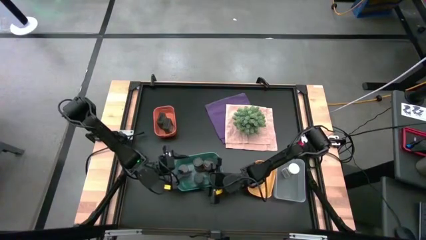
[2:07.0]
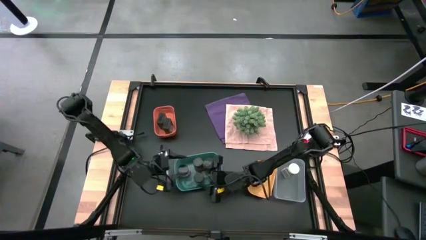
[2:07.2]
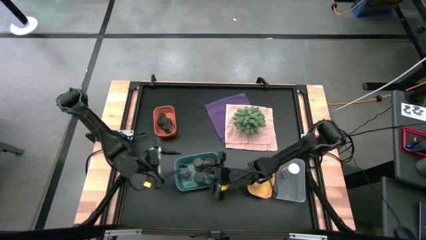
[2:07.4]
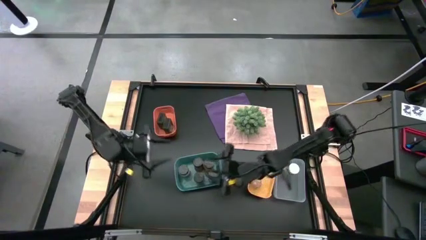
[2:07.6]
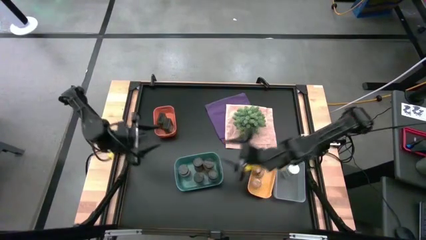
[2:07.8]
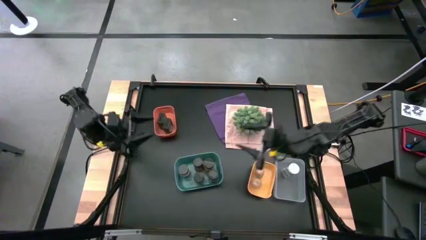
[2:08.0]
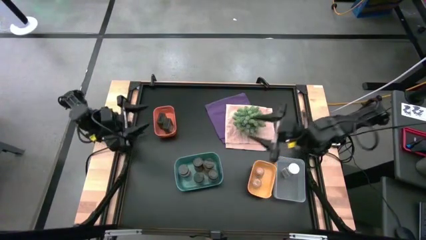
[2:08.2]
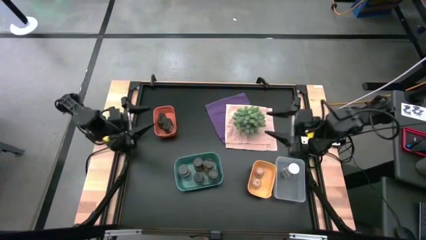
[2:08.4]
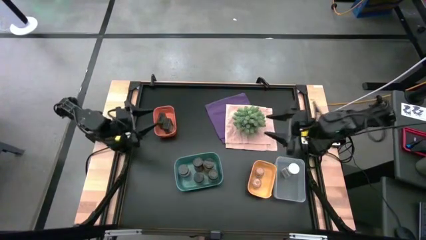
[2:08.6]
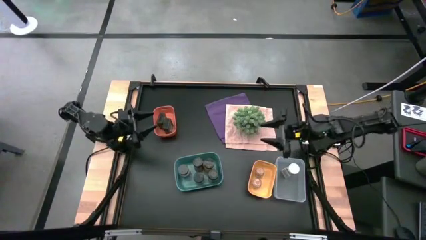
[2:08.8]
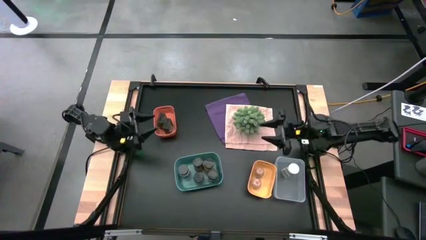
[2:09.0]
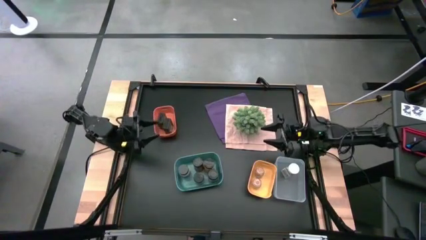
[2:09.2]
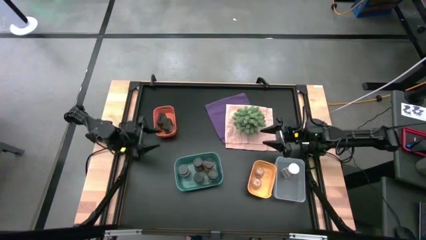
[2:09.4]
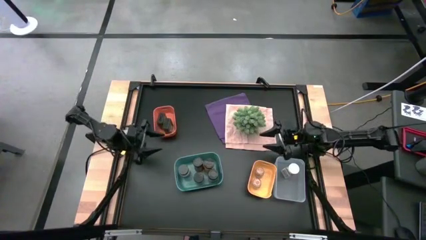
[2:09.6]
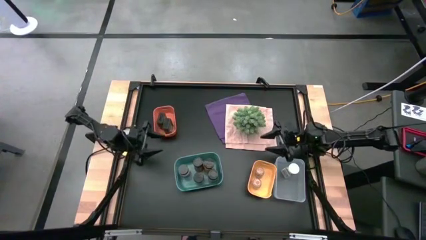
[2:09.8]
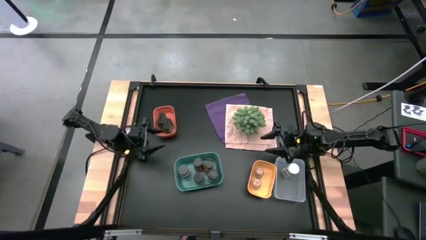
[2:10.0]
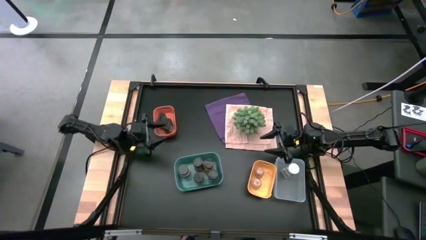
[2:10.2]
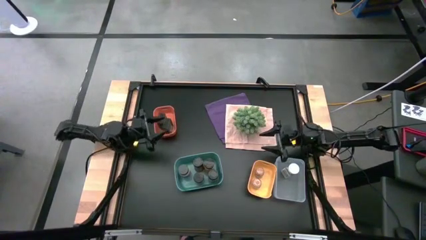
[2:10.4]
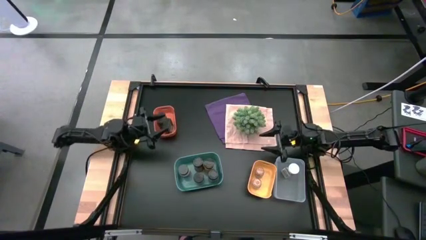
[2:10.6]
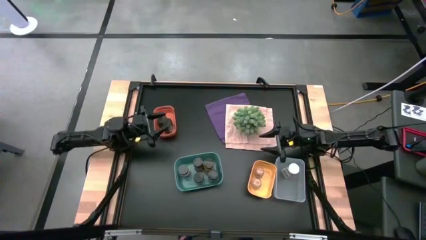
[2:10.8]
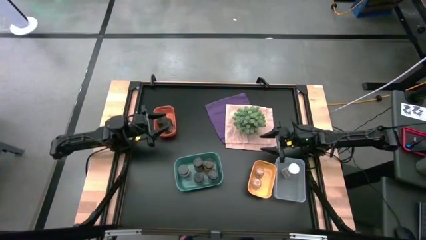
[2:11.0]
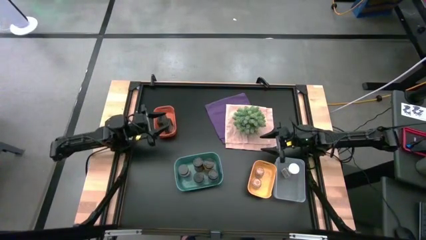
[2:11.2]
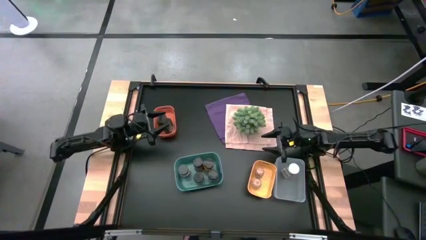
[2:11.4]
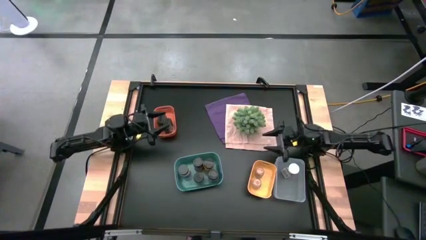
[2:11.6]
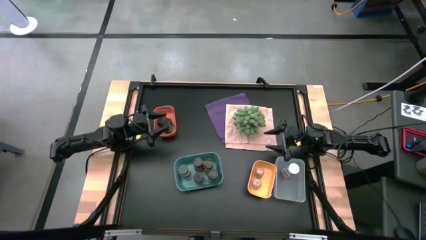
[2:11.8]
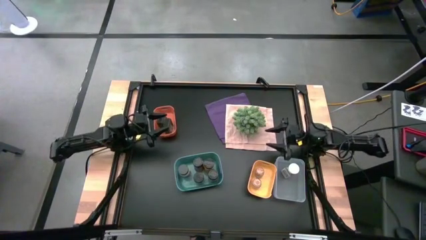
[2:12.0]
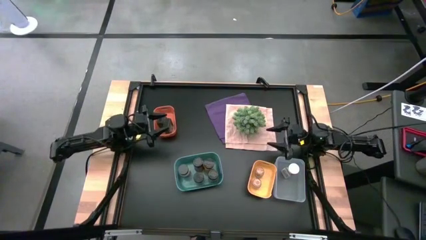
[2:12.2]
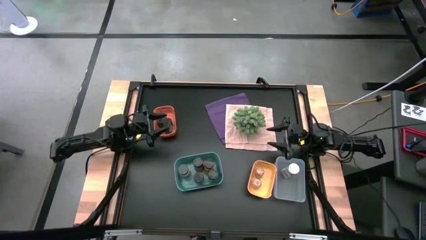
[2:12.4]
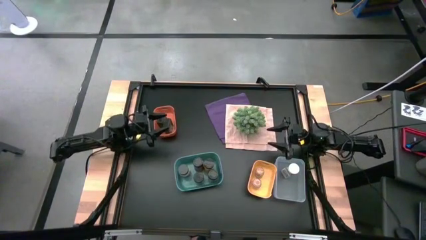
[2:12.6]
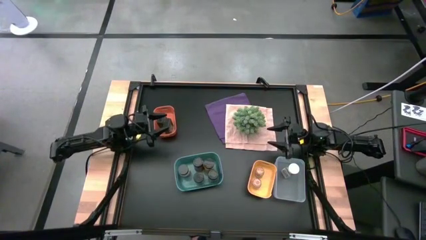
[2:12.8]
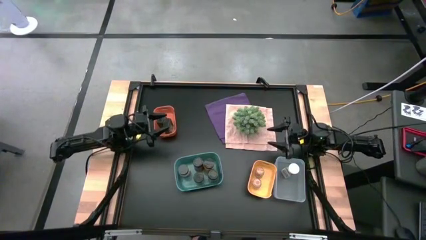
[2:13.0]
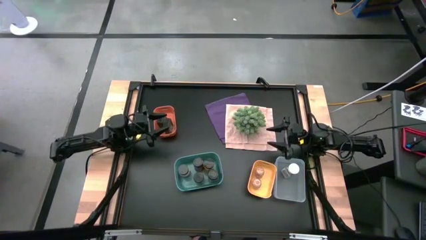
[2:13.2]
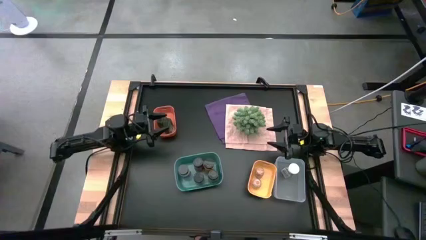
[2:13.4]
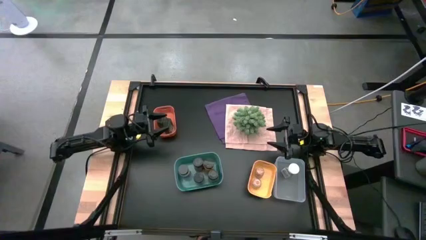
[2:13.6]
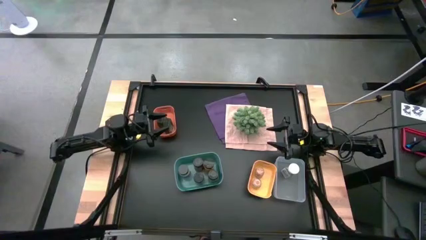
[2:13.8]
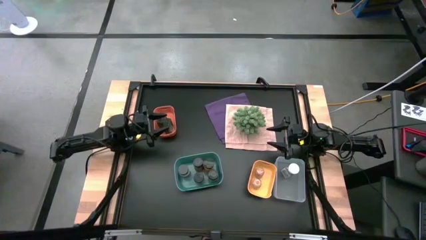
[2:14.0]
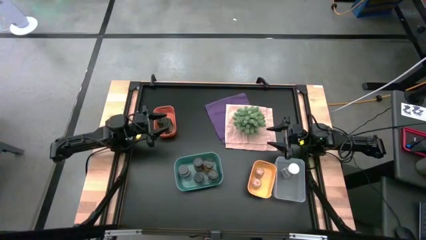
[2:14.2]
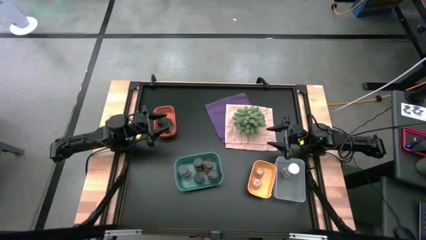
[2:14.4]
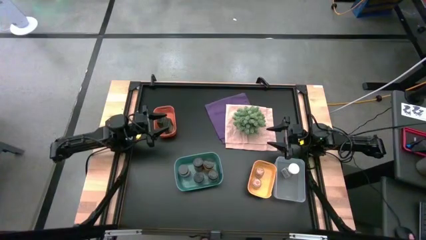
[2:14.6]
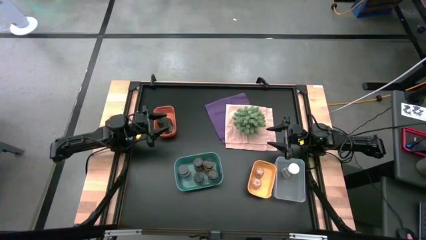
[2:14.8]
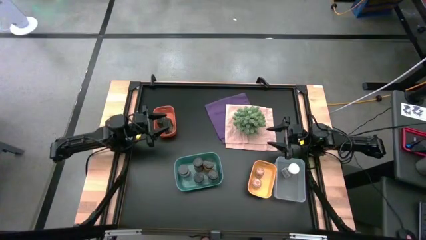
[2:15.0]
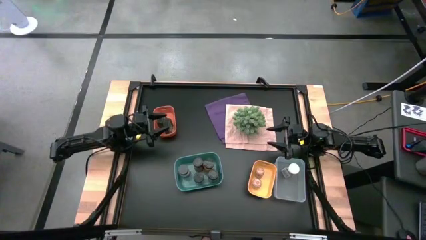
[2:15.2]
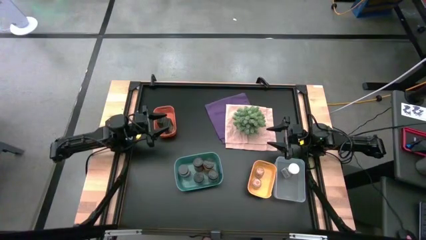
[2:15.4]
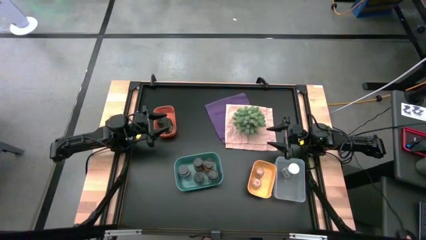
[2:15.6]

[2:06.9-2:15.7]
Task: Sort spices by type
Return to Home Position

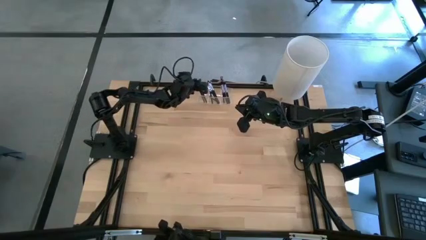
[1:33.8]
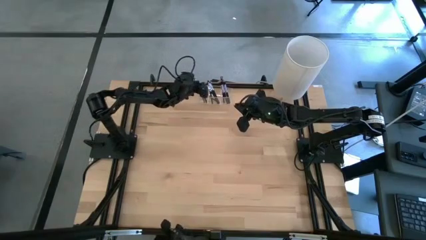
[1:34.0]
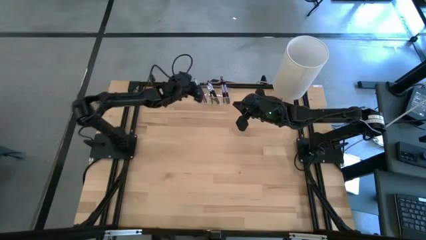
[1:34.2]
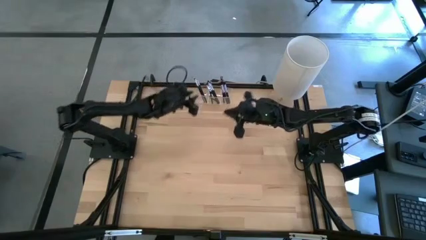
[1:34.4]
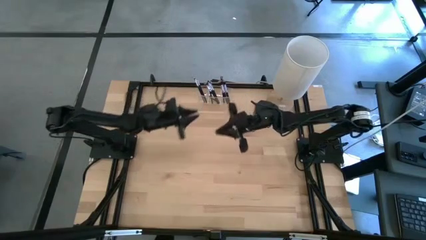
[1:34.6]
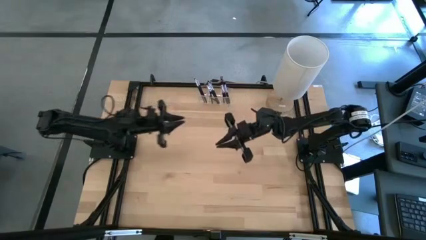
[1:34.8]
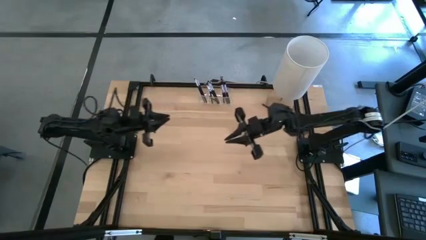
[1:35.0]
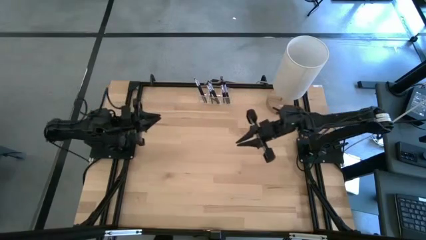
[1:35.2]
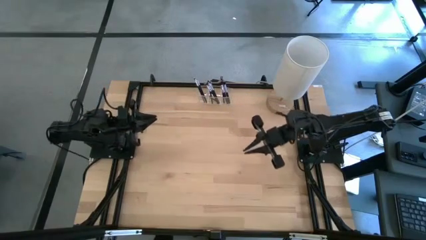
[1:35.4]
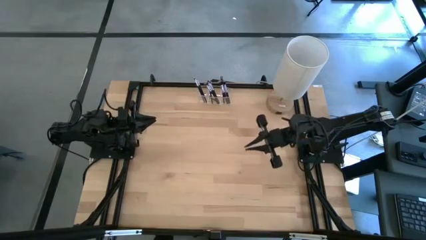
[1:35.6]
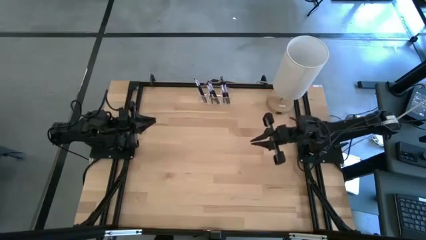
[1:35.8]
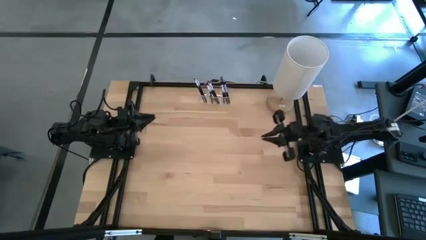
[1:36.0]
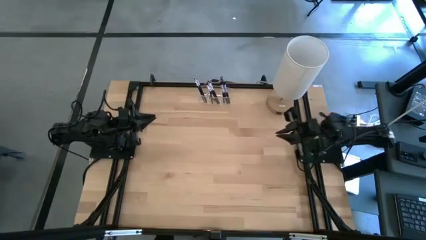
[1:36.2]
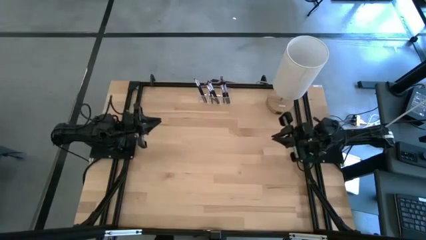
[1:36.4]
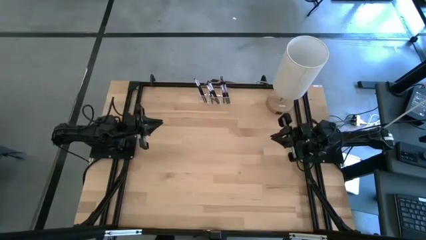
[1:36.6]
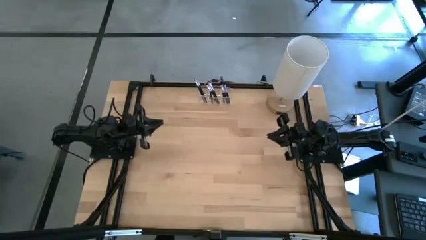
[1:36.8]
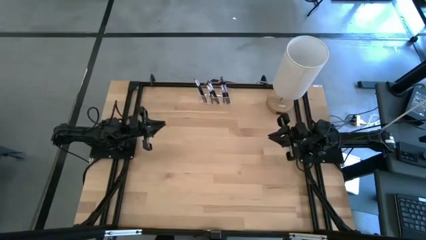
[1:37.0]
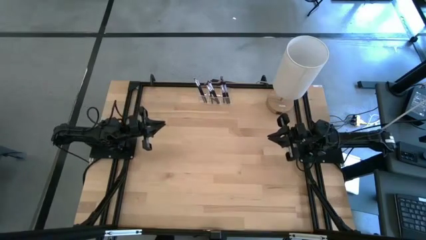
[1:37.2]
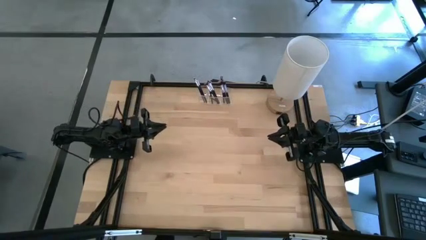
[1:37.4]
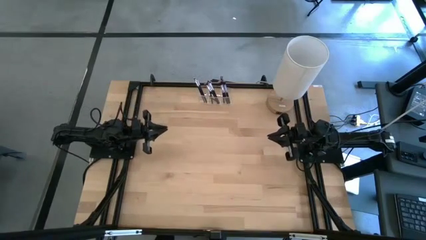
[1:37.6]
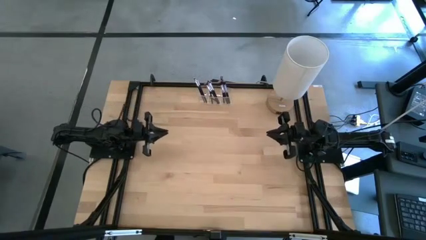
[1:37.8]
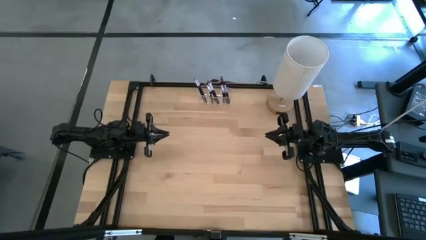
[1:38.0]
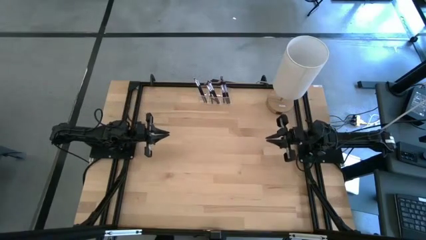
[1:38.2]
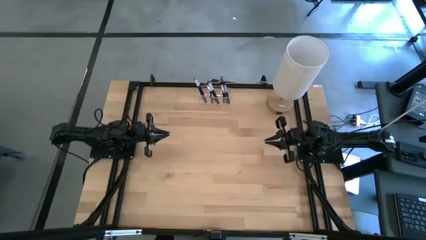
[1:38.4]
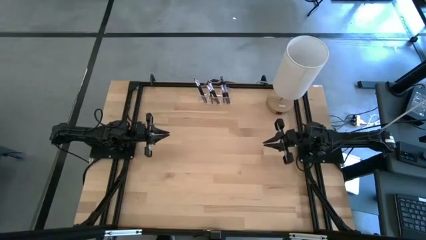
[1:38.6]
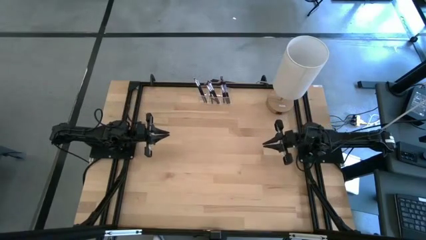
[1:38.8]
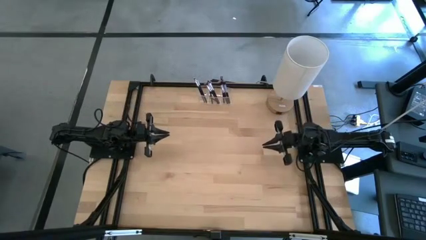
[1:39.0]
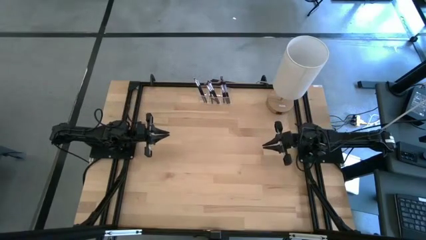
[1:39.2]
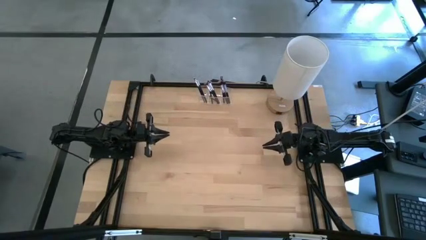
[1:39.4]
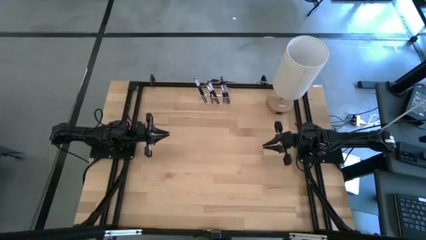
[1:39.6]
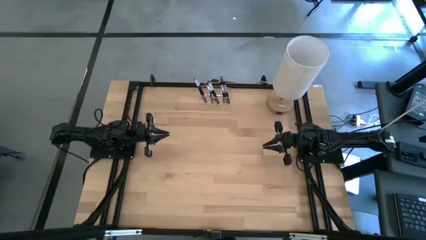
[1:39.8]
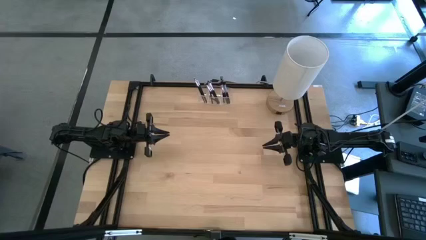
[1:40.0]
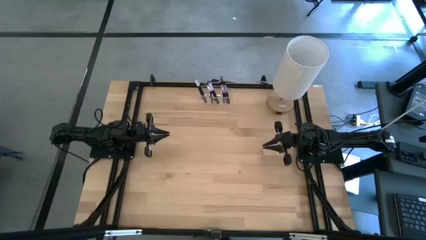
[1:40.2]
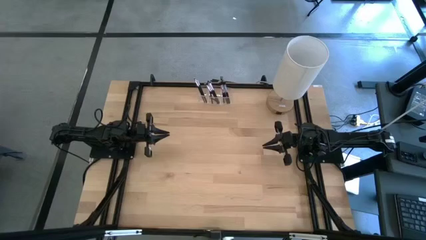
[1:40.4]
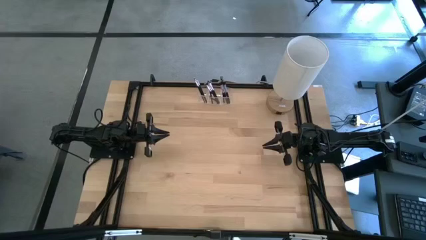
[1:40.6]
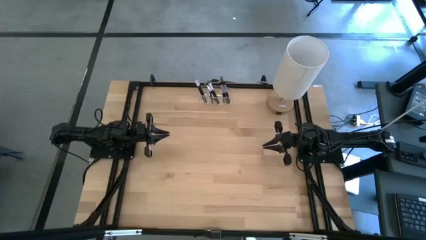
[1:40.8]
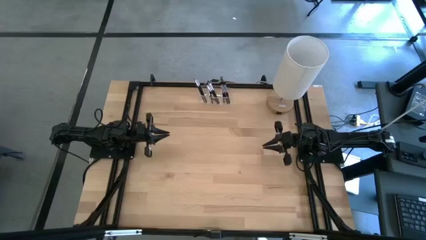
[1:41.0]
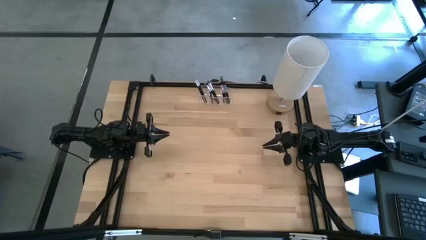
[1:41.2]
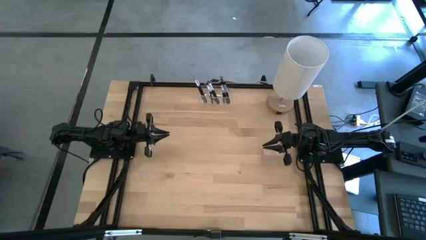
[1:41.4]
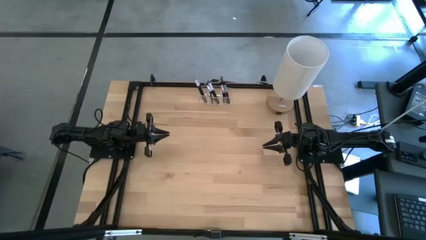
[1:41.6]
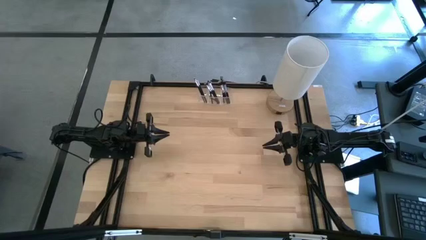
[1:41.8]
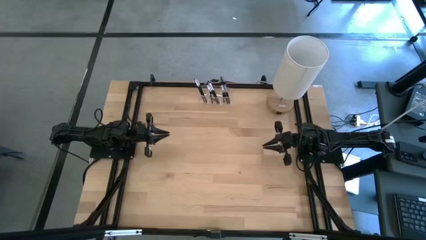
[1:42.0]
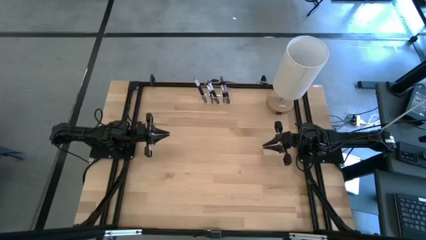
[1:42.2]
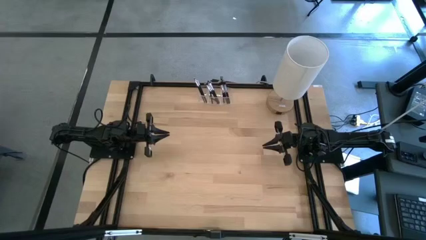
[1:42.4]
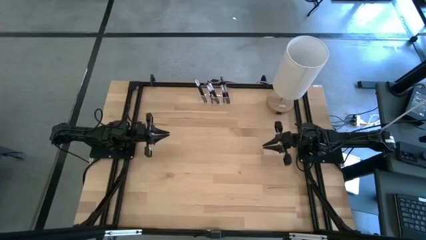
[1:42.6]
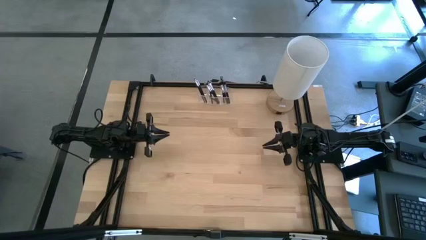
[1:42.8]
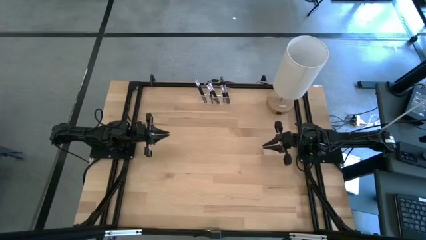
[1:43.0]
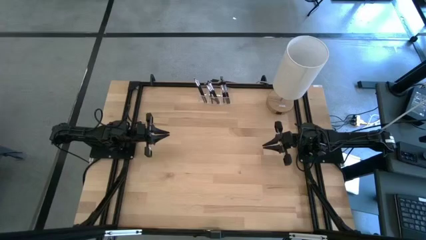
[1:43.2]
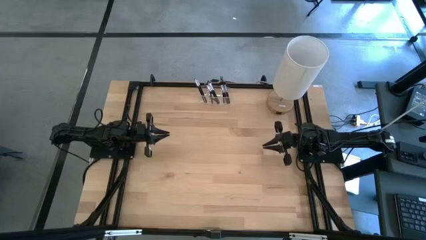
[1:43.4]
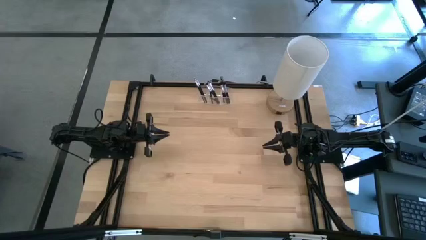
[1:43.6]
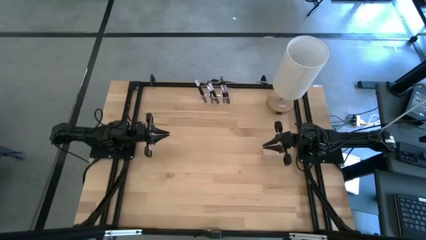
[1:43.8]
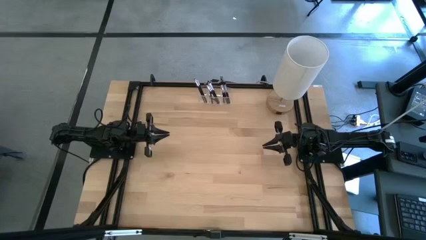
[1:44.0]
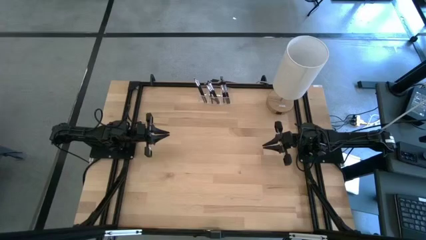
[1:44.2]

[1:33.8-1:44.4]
Task: Put items in baskets/containers
Return to Home Position
